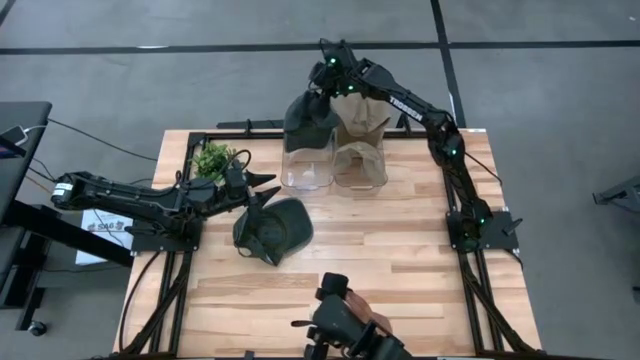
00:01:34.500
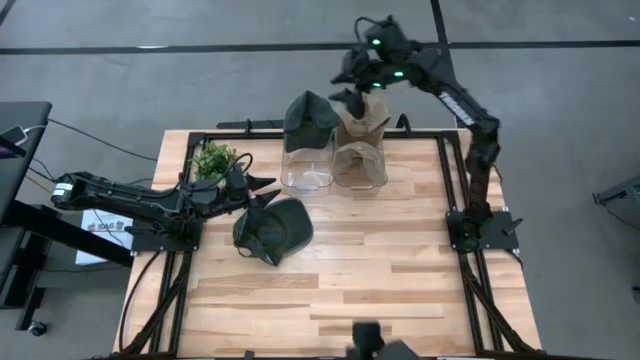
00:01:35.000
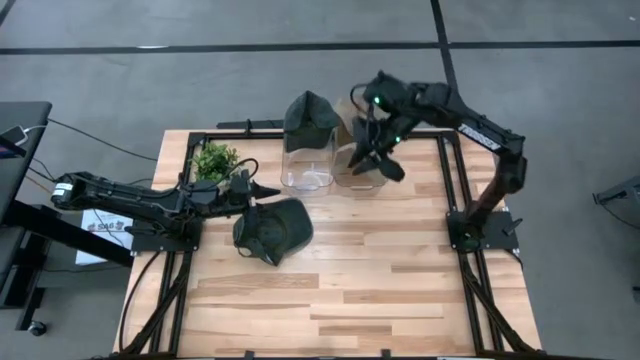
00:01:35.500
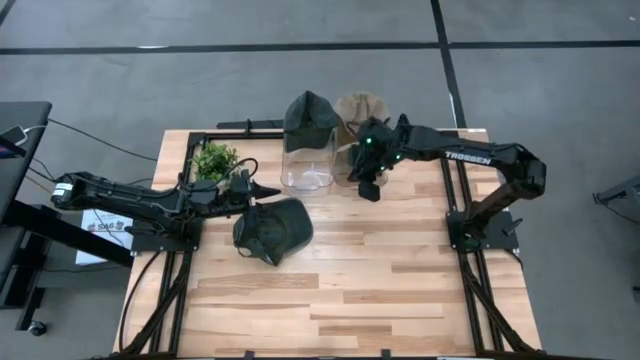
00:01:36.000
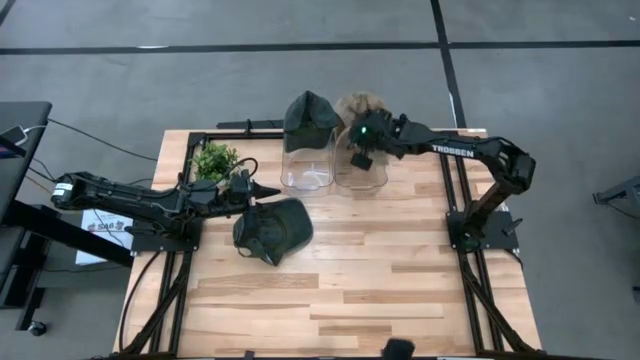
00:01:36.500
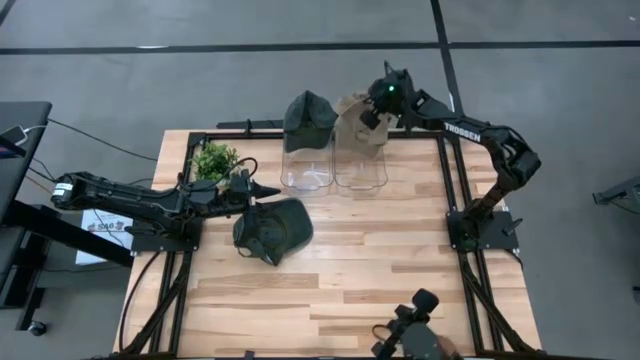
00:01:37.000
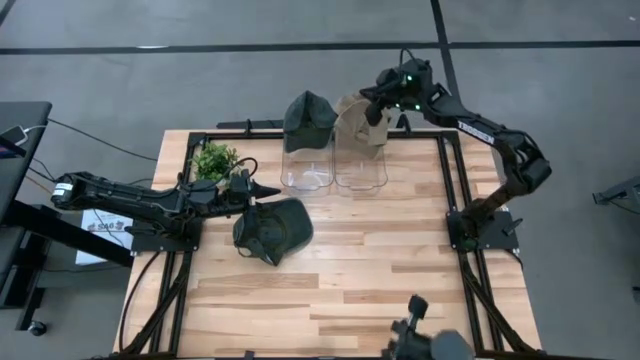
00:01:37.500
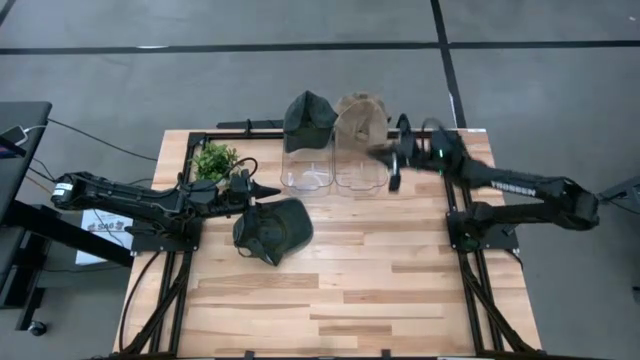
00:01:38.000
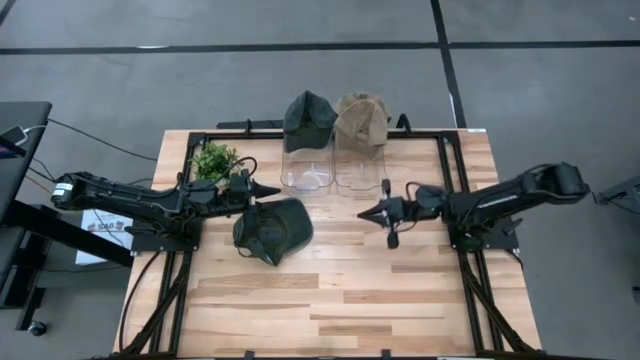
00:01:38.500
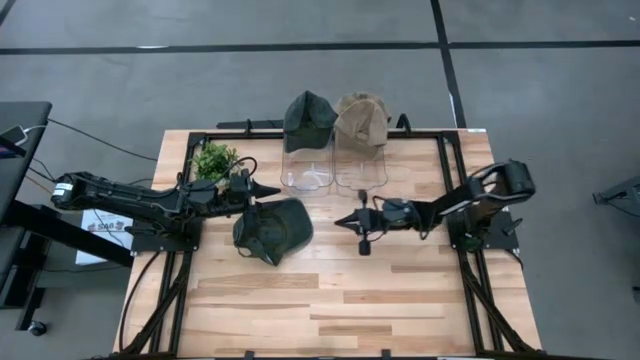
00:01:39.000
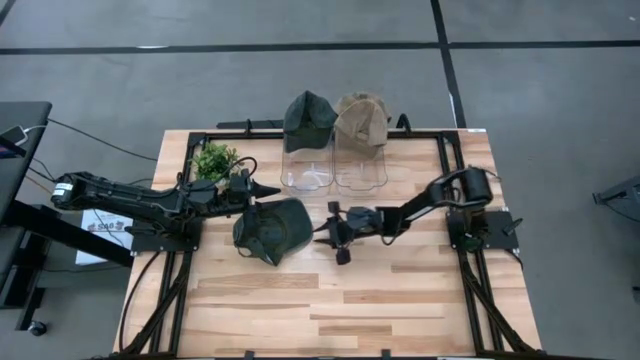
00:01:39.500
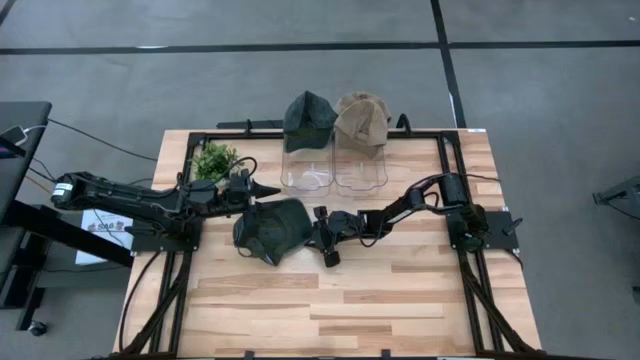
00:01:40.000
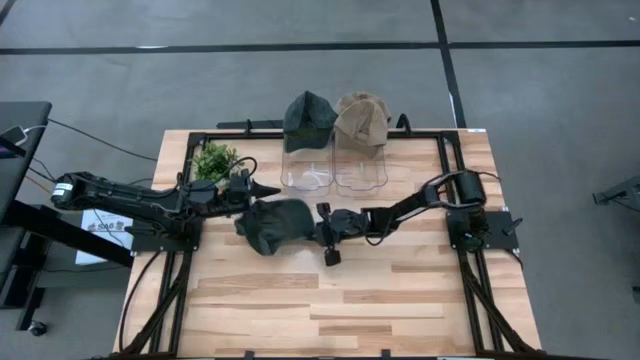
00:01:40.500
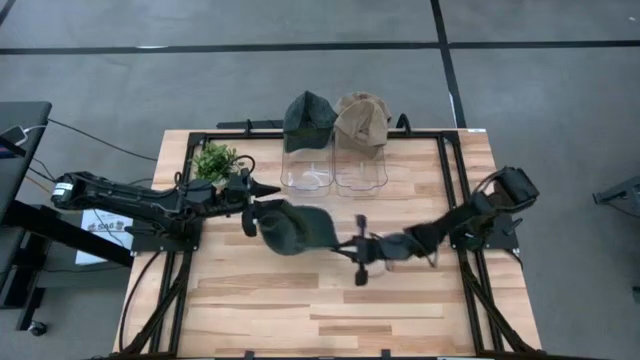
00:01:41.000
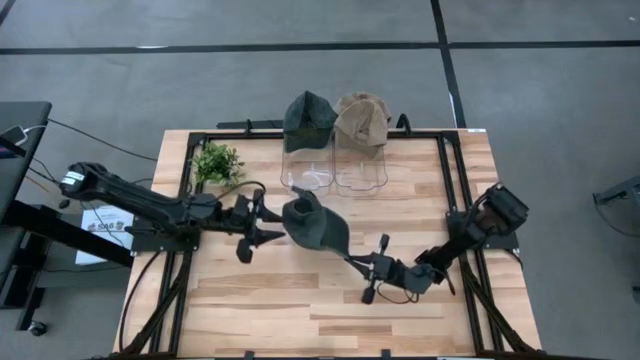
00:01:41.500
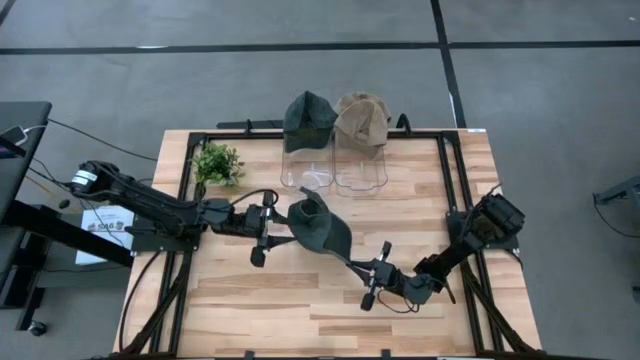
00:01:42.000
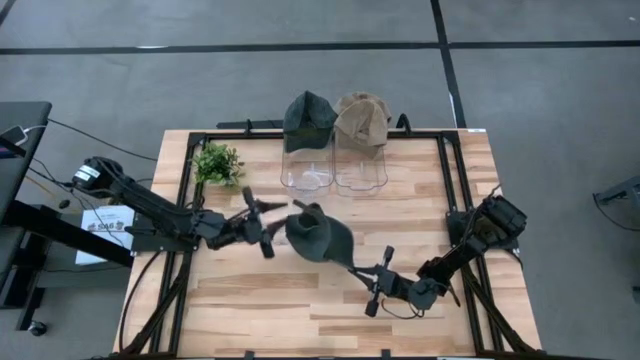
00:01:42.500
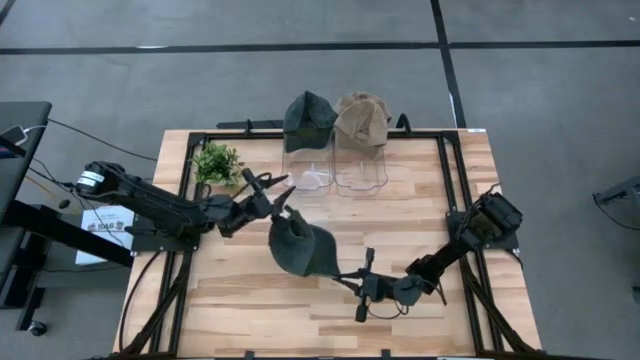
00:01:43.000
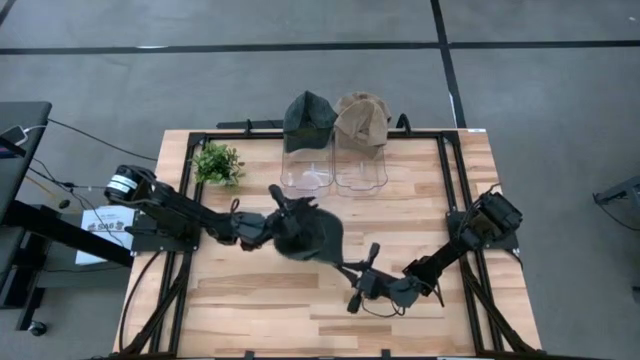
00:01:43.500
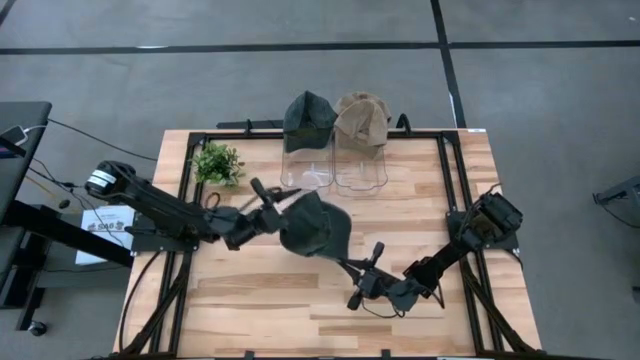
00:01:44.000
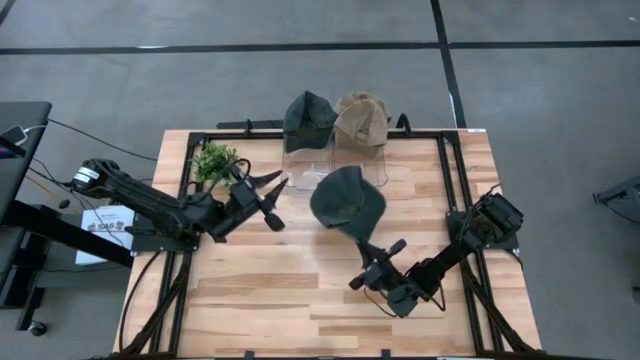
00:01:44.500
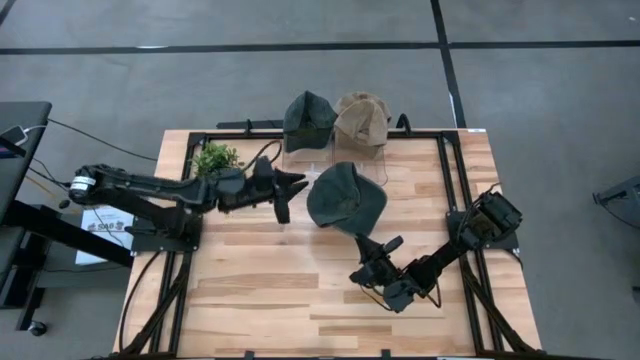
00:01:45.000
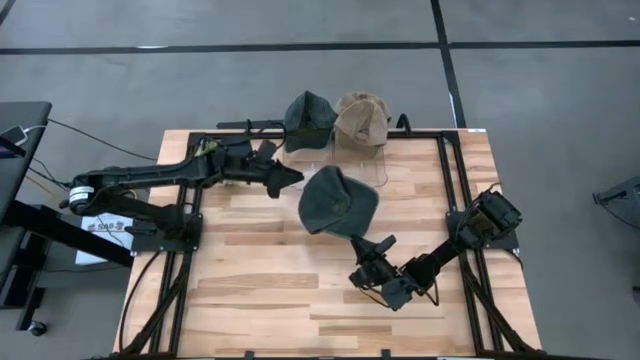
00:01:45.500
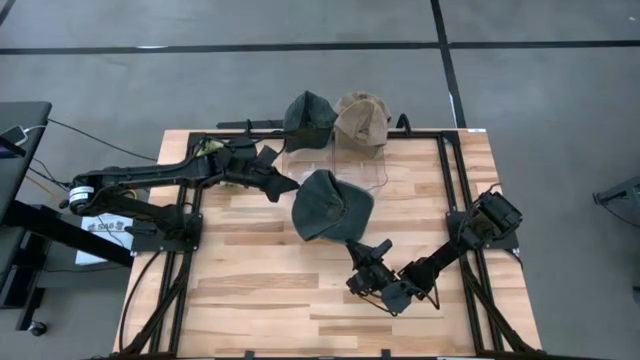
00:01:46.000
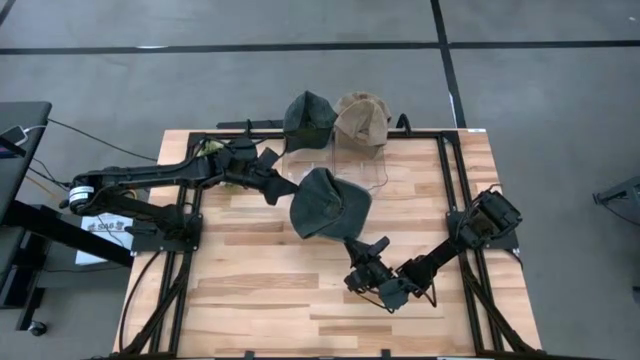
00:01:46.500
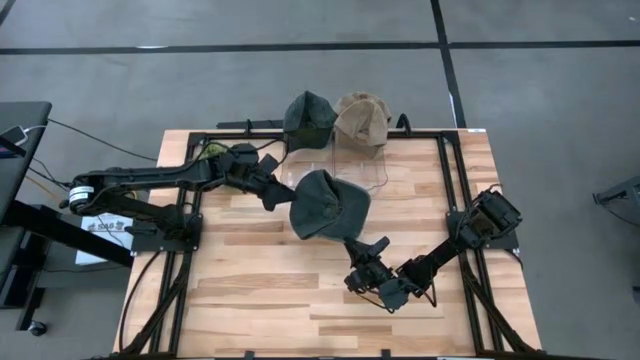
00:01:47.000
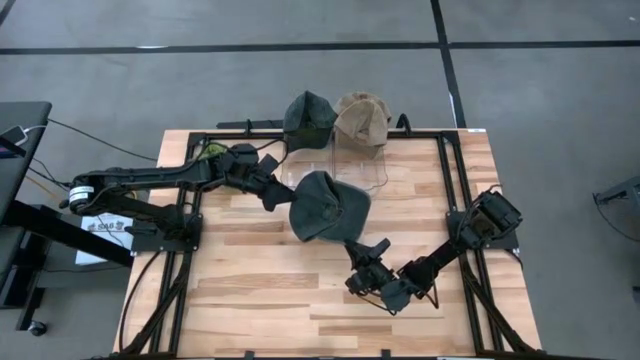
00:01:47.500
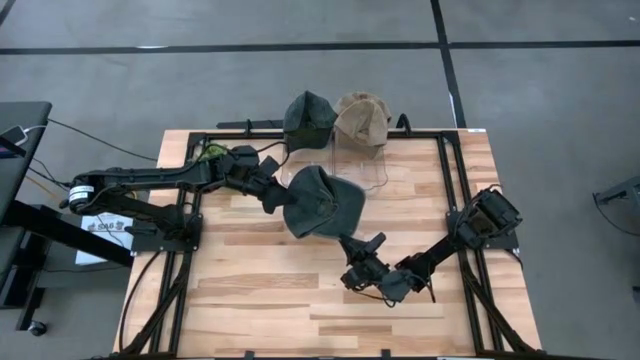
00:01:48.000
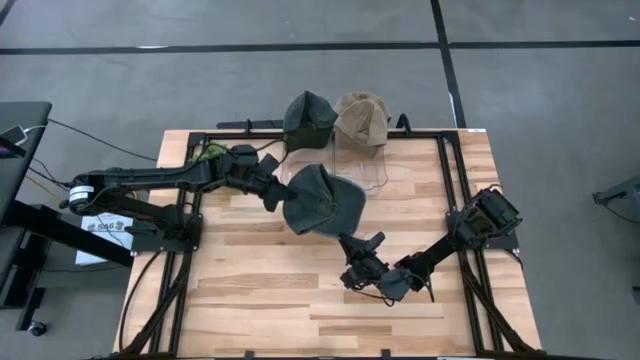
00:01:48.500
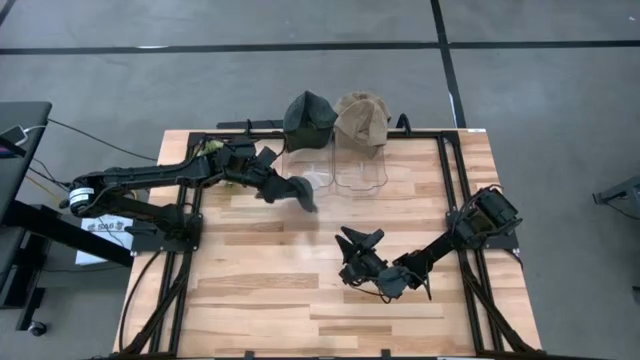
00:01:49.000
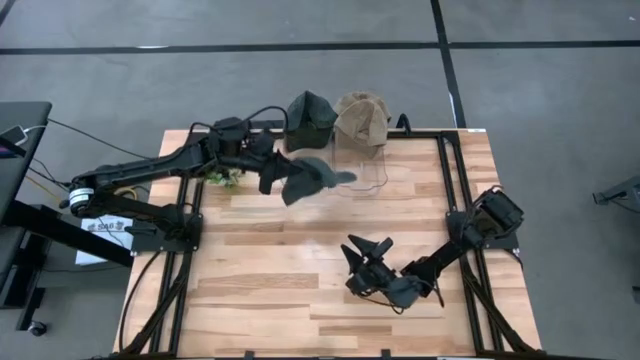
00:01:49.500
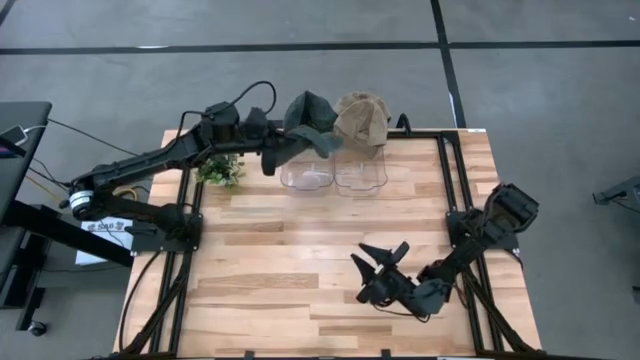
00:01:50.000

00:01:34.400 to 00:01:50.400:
Task: Pick & Place hat
Put the black cap into the left transparent bin

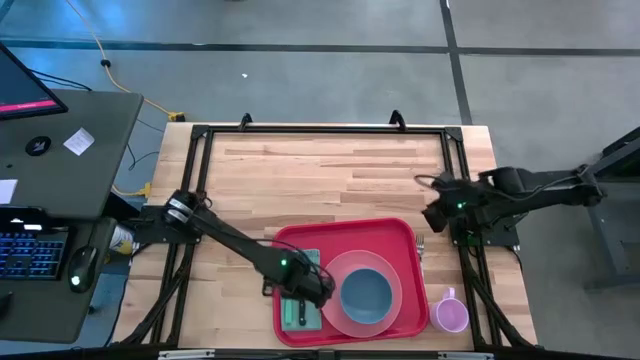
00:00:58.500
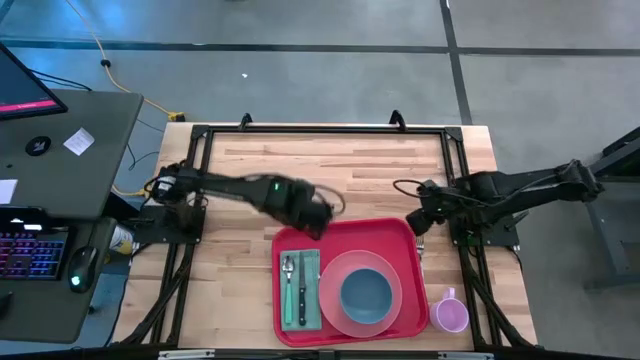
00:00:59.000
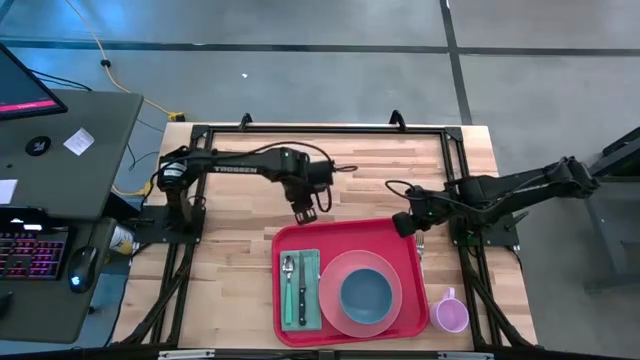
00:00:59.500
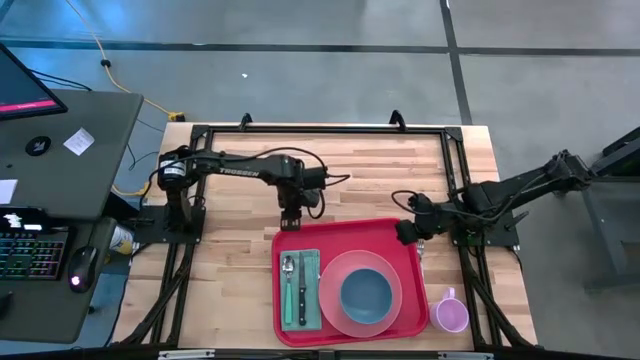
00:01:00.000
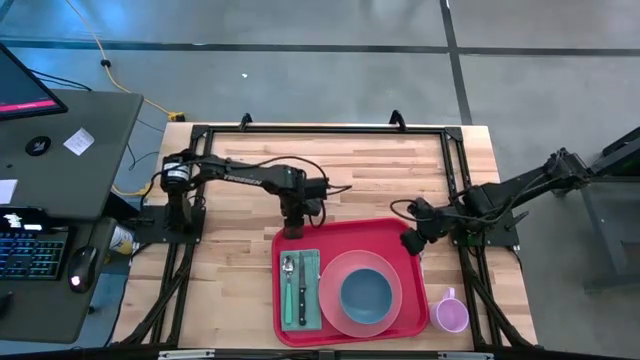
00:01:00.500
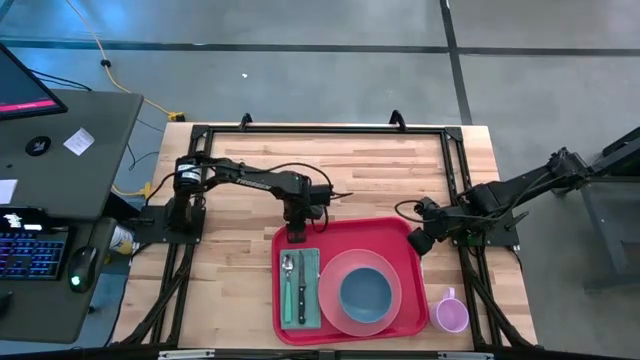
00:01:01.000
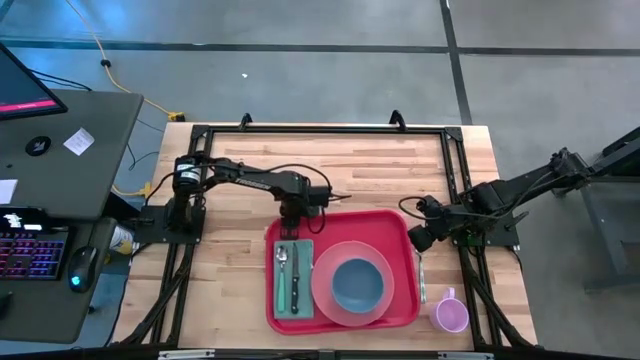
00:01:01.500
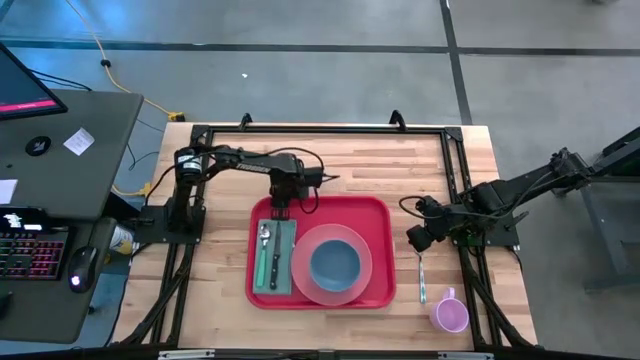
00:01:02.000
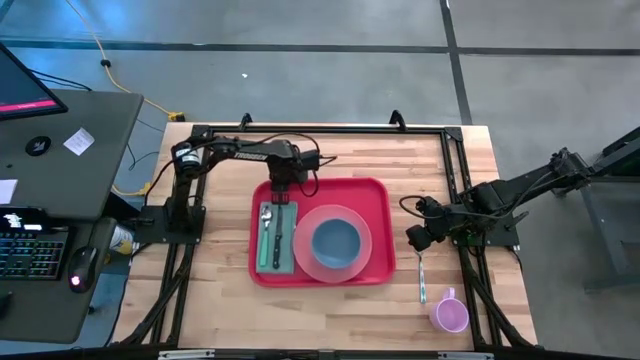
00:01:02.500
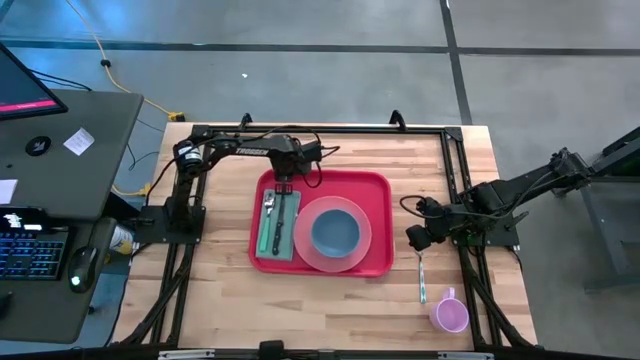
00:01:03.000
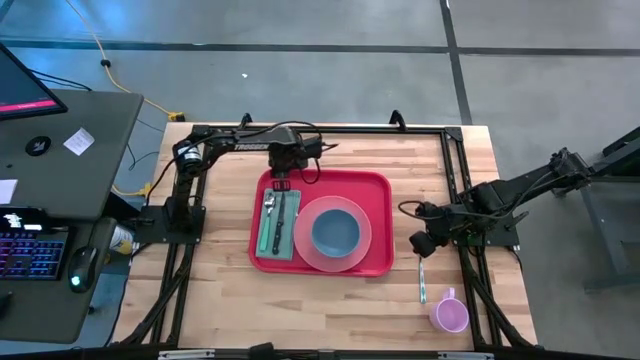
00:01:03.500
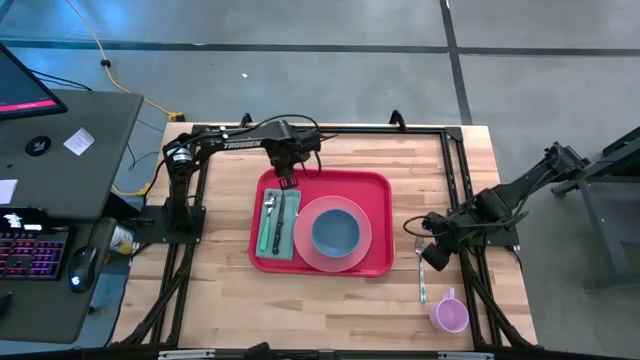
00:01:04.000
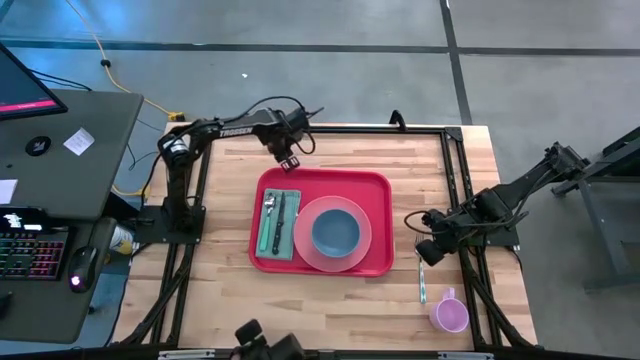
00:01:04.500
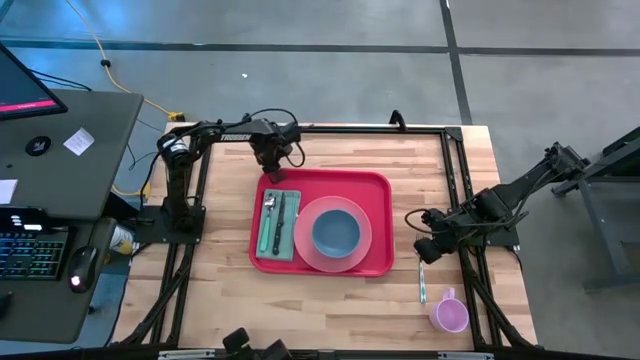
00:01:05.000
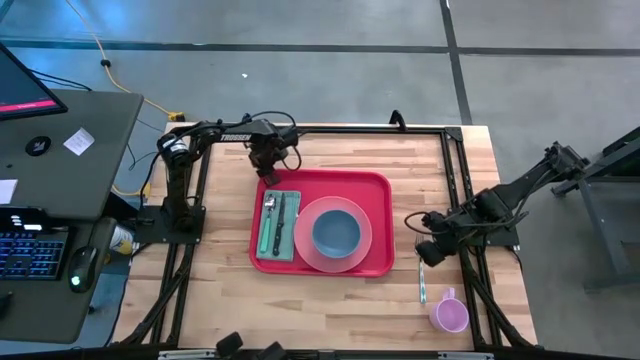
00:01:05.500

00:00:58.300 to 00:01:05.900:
Task: Set up tray
Move the red tray to the middle of the table
